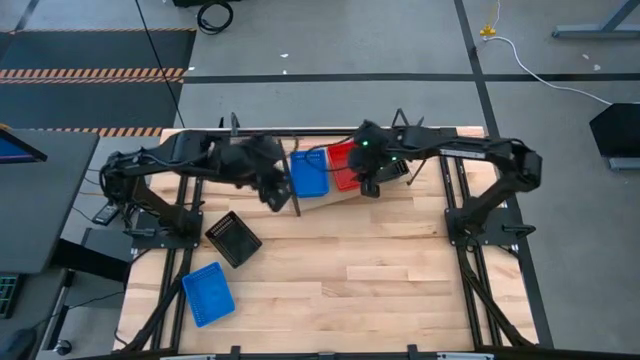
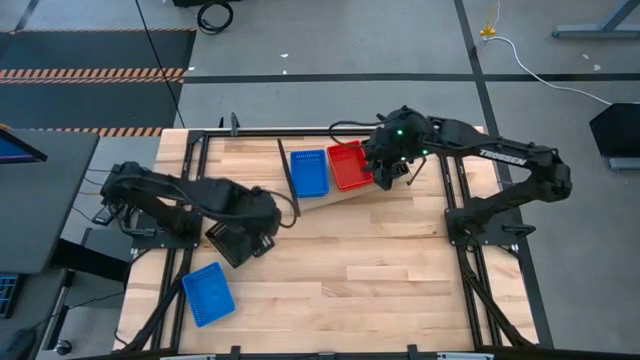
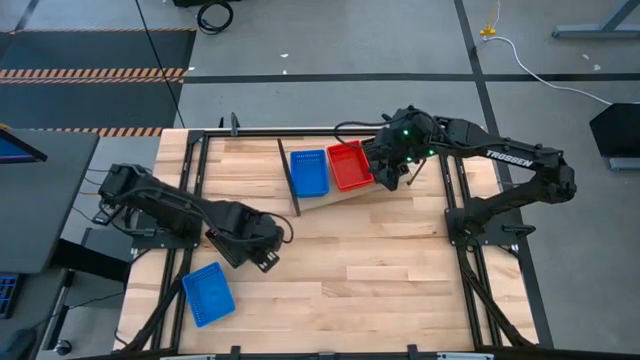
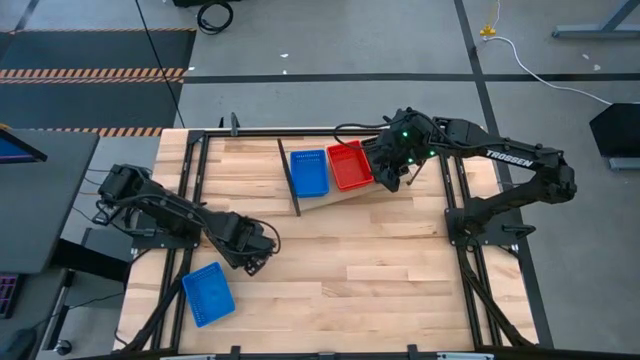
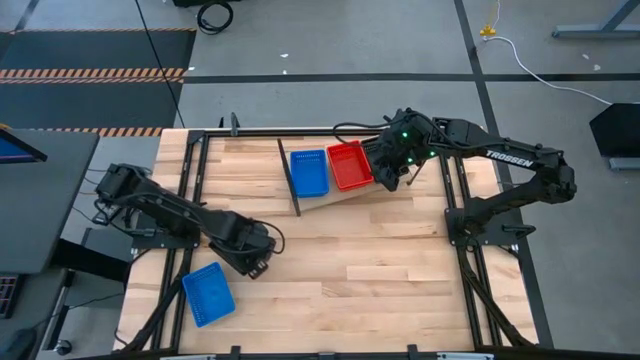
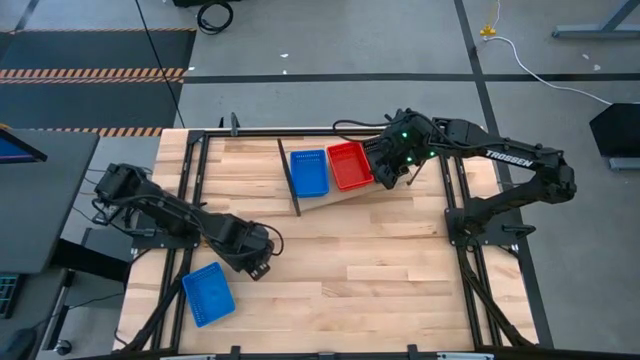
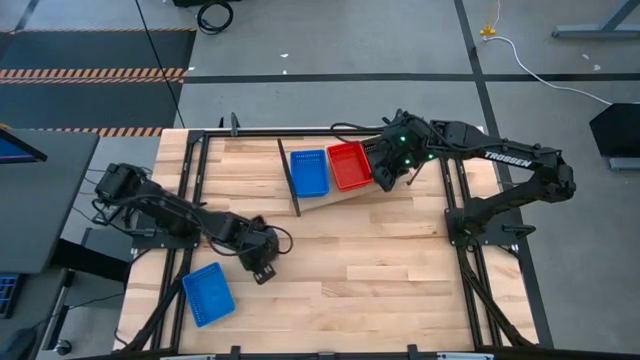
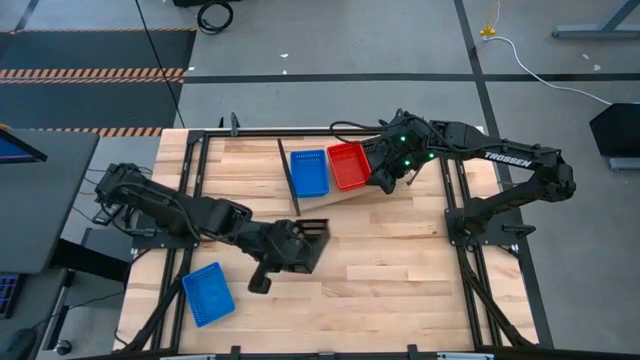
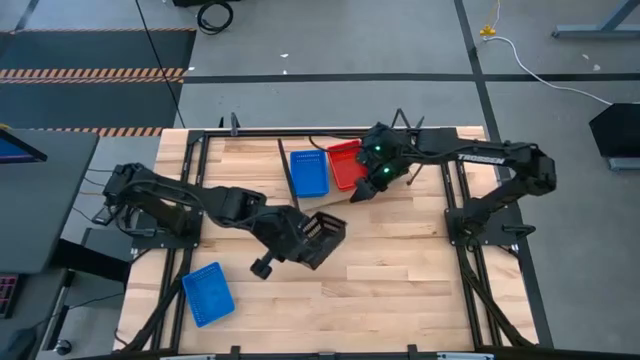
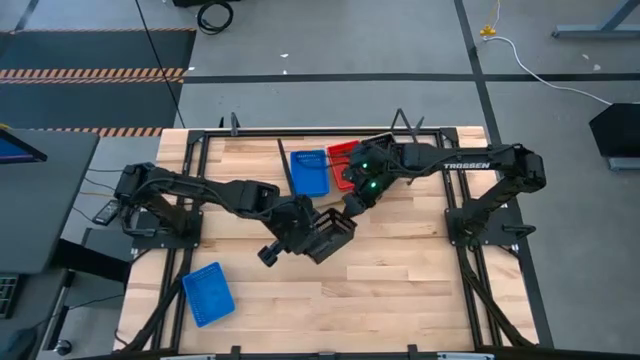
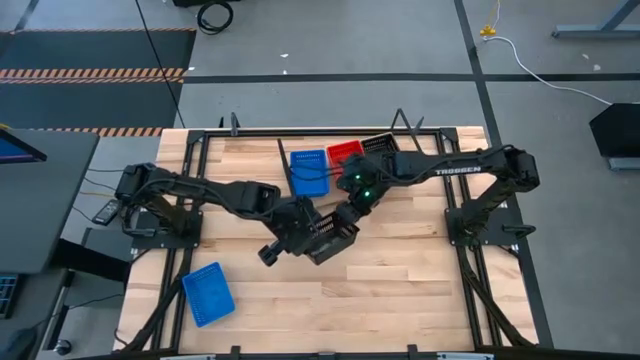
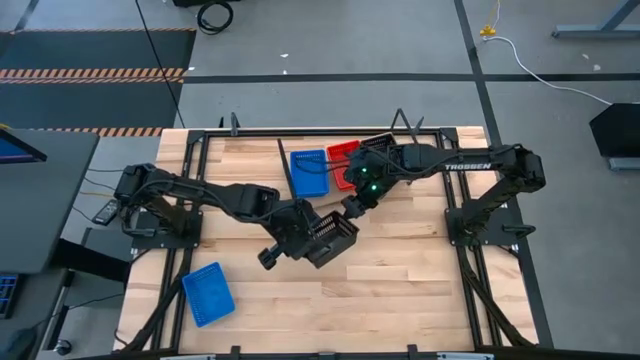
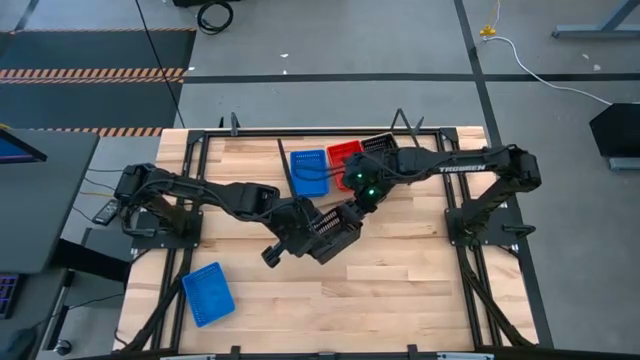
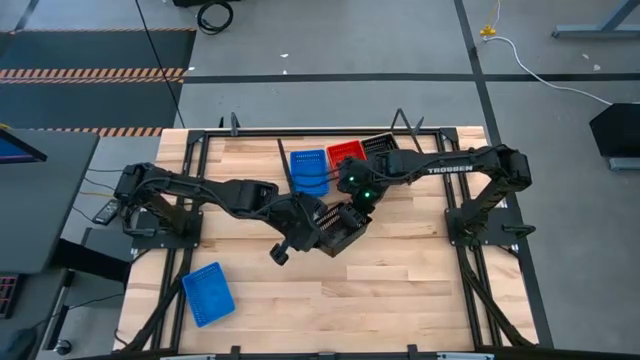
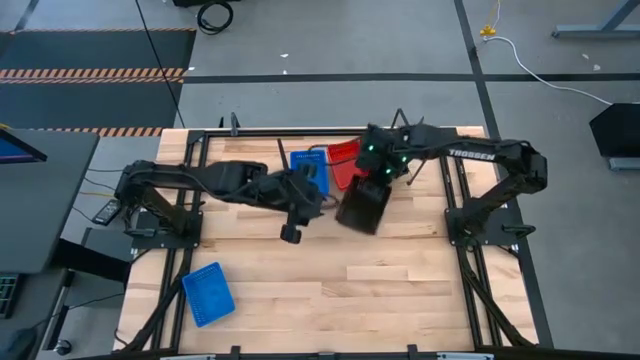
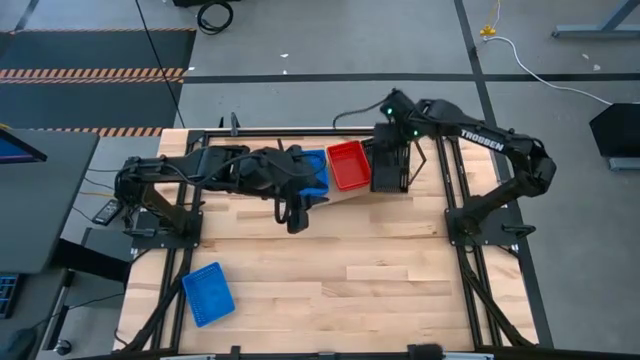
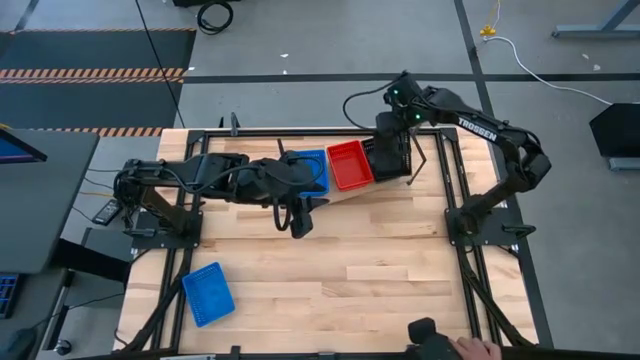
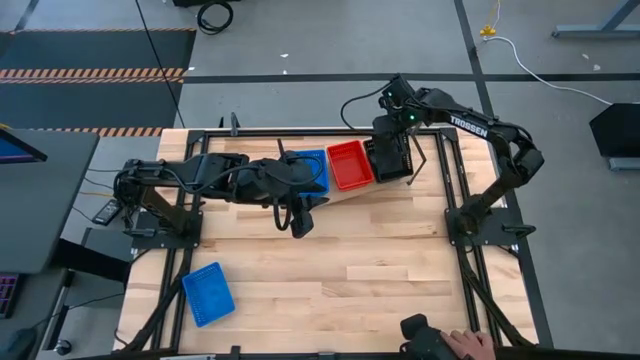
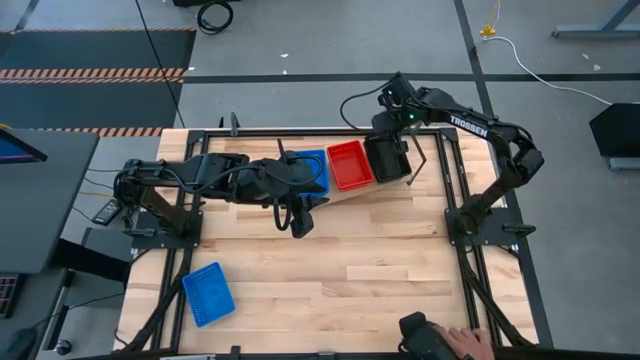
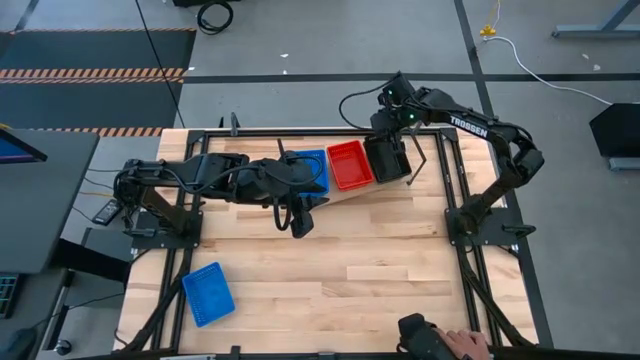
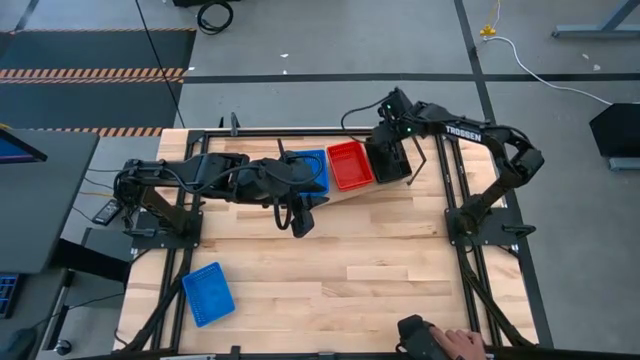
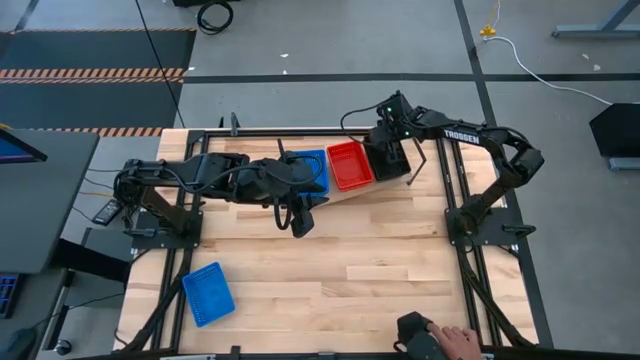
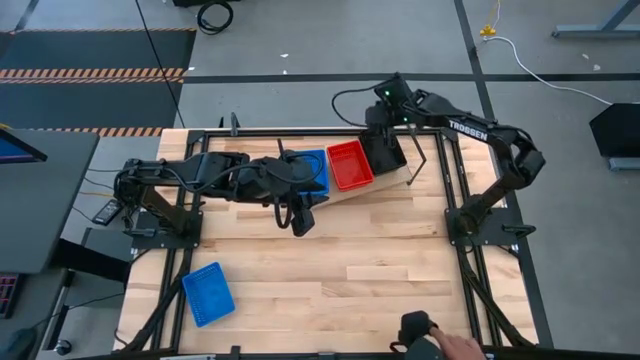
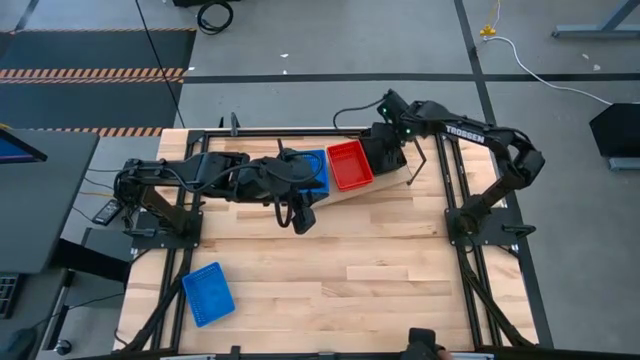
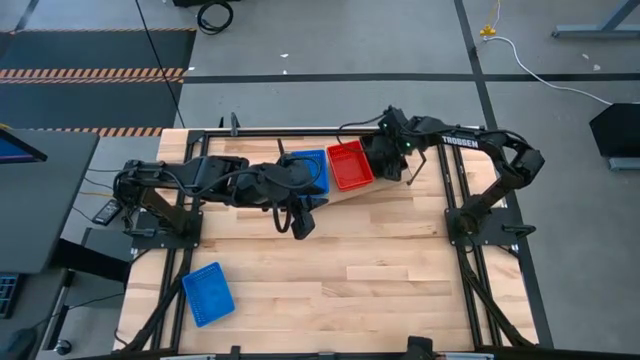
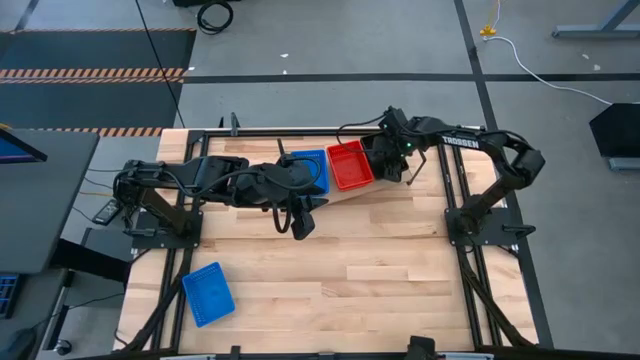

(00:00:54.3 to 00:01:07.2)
Task: Stack baskets on shelf by color
Stack the black bin on the stacked black bins on the shelf

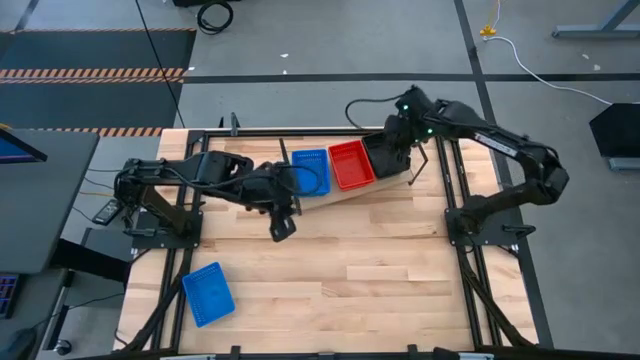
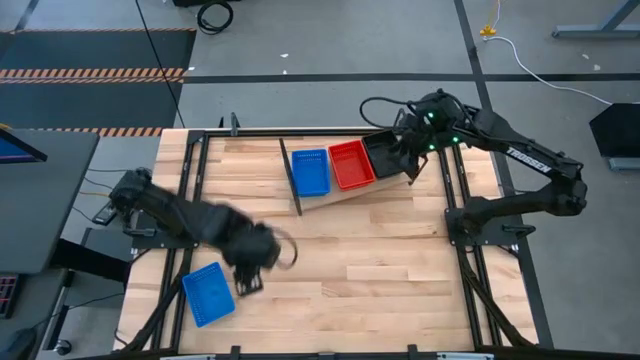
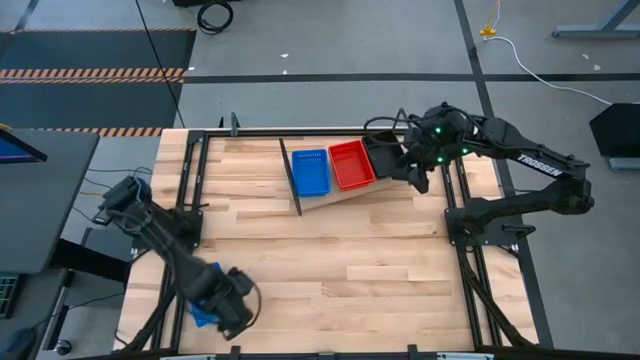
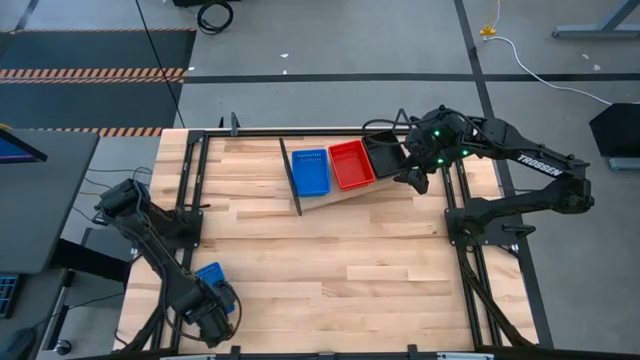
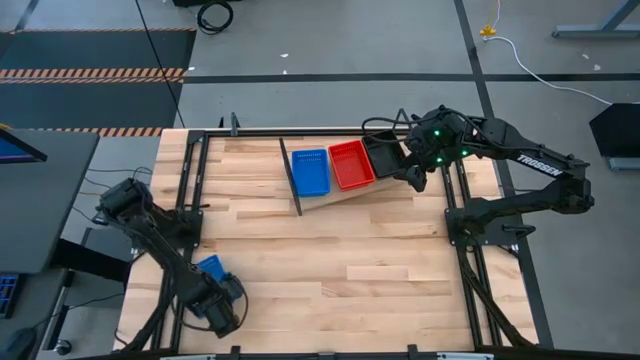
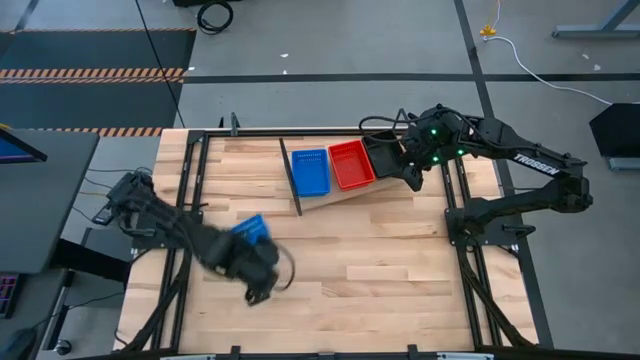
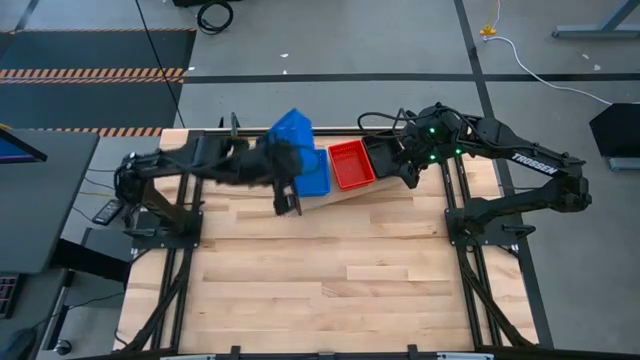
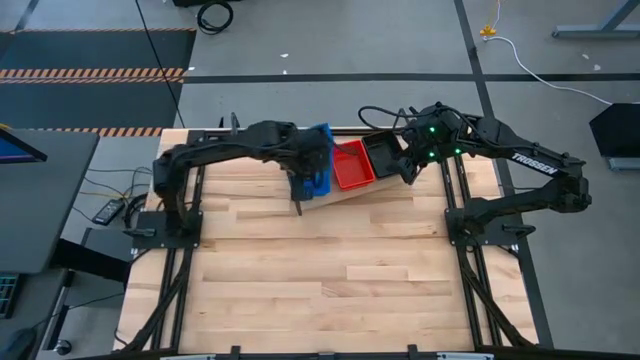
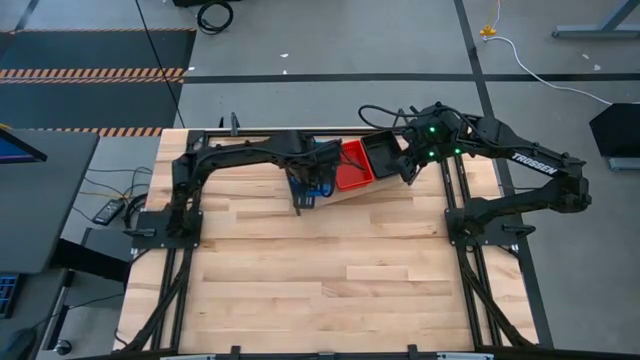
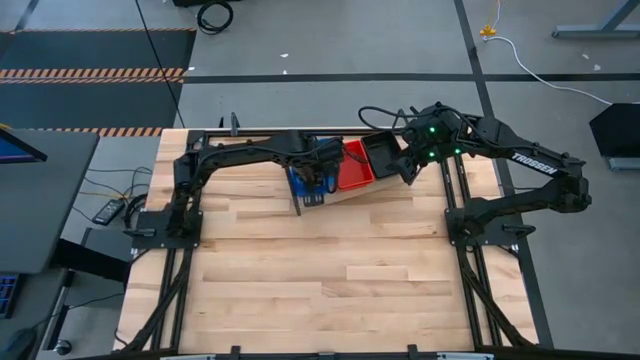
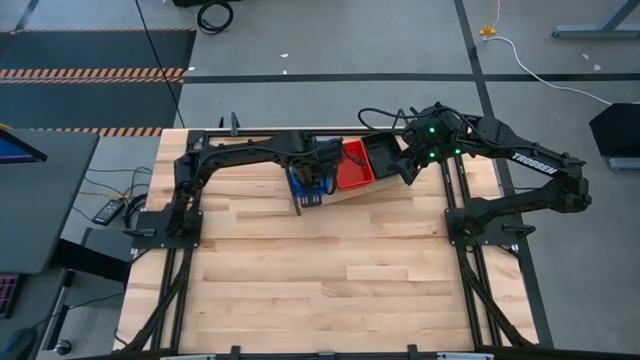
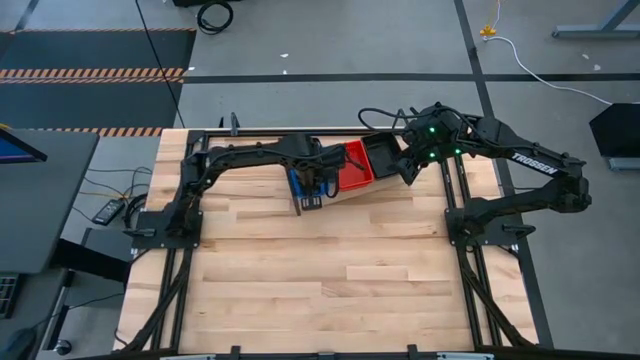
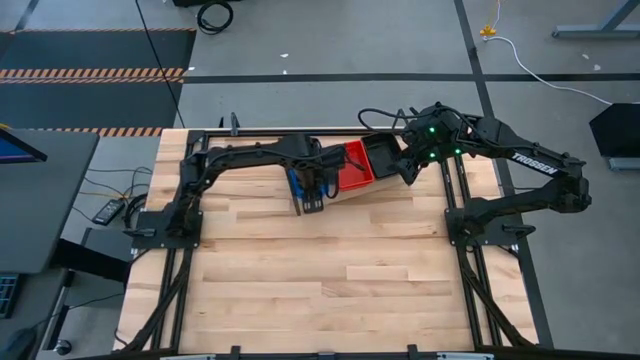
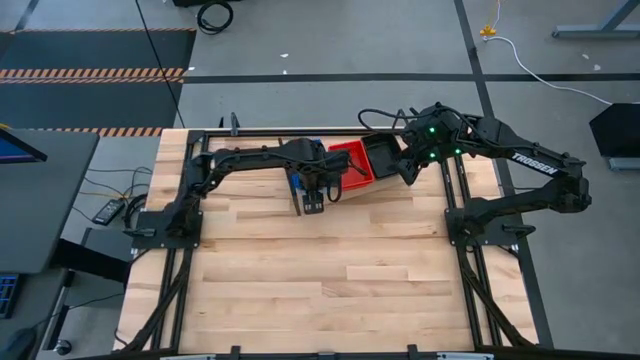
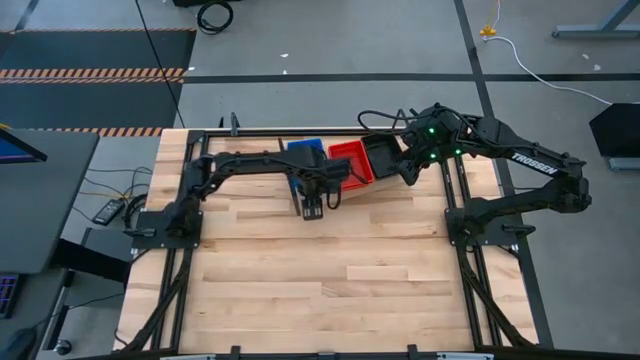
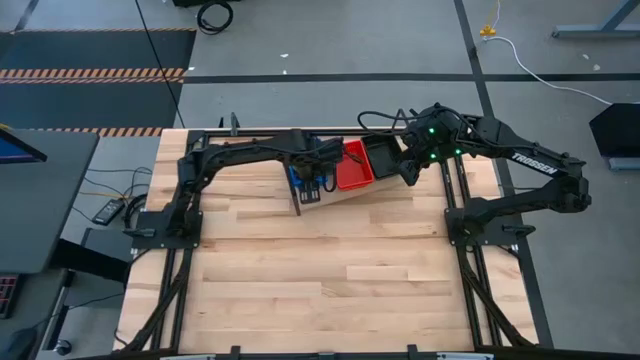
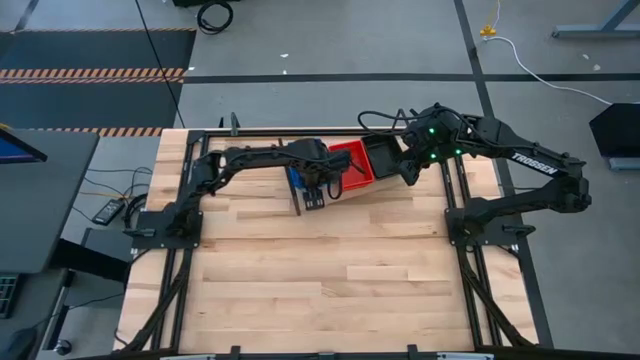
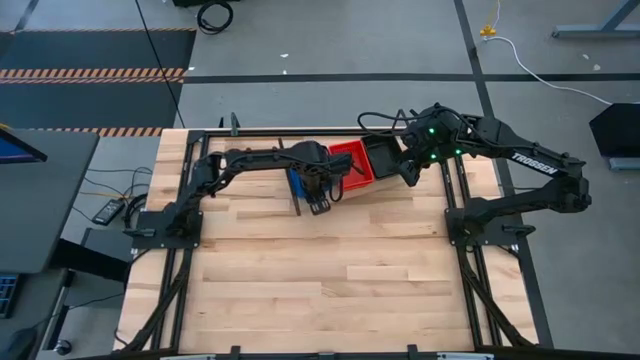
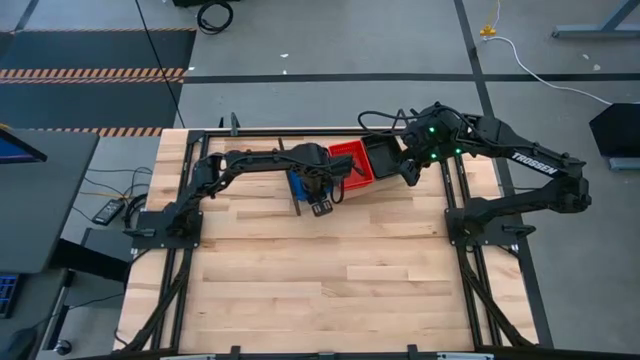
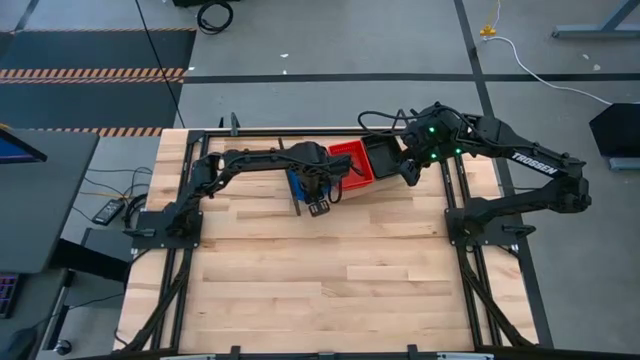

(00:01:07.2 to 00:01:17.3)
Stack the blue bin on the stacked blue bins on the shelf
